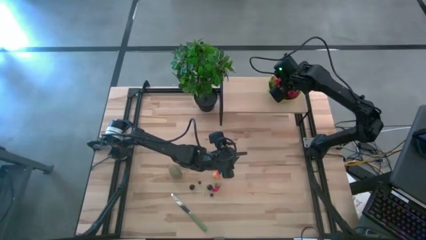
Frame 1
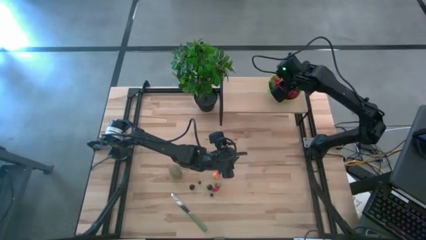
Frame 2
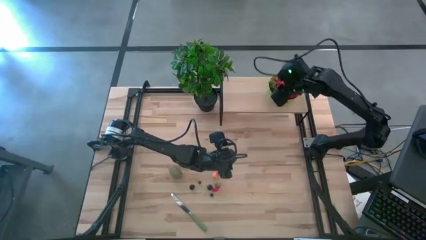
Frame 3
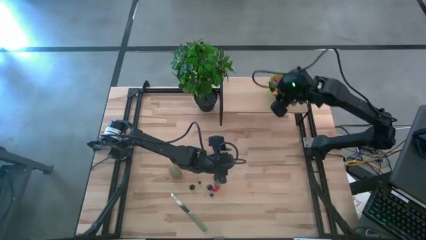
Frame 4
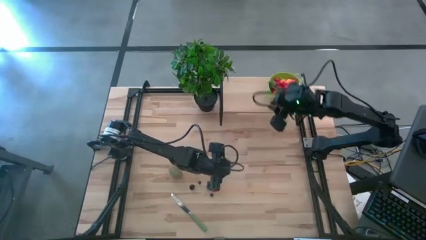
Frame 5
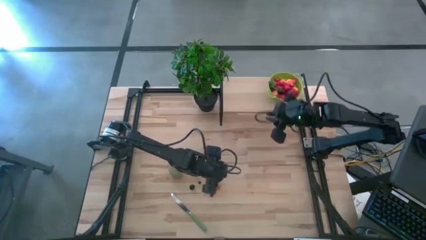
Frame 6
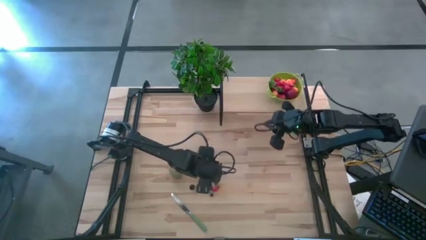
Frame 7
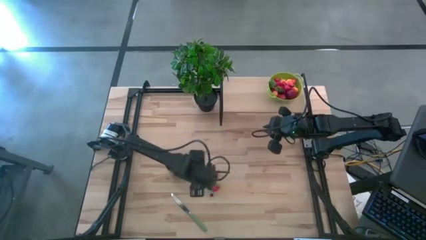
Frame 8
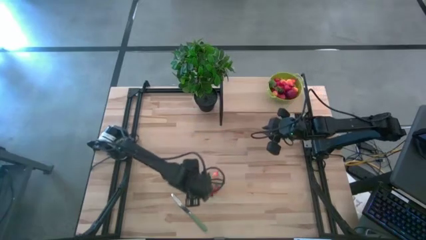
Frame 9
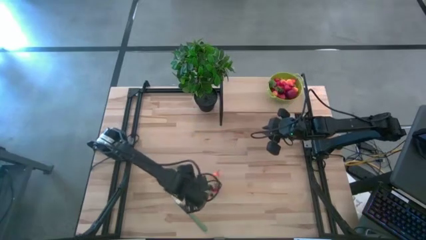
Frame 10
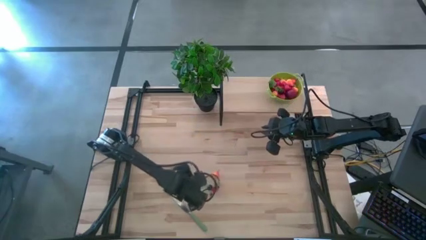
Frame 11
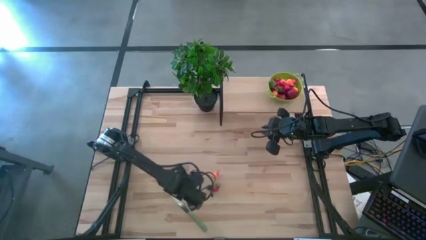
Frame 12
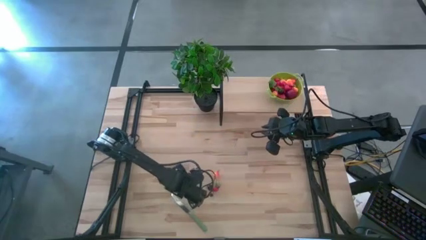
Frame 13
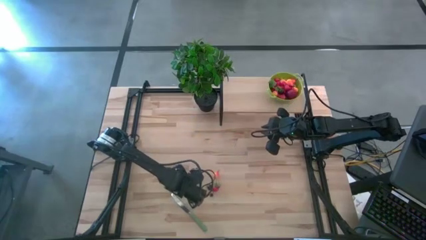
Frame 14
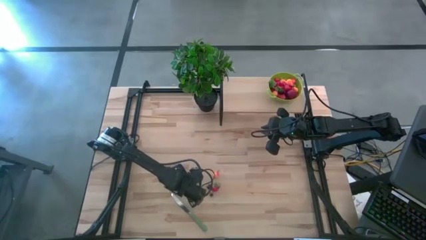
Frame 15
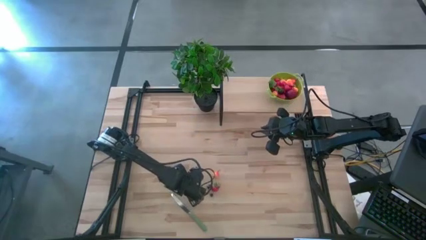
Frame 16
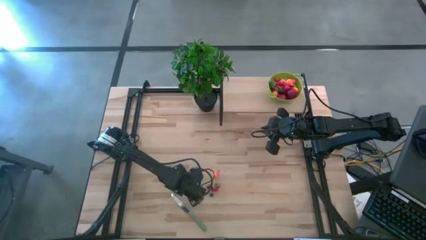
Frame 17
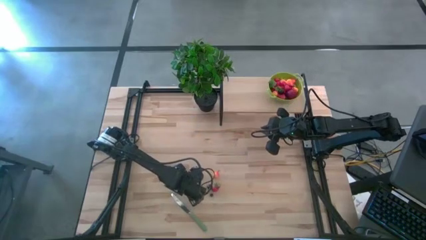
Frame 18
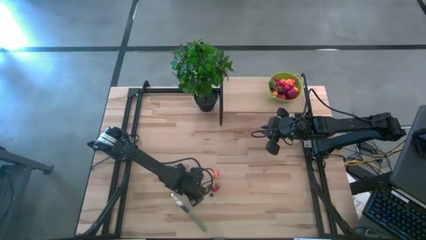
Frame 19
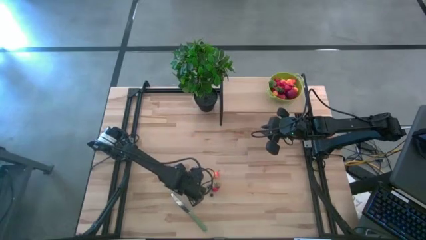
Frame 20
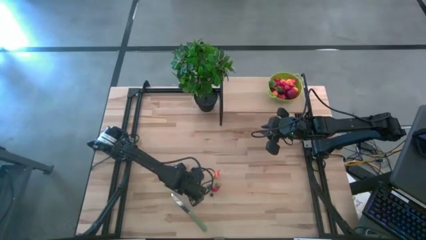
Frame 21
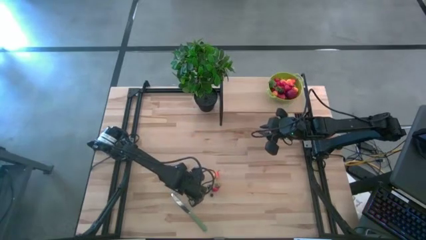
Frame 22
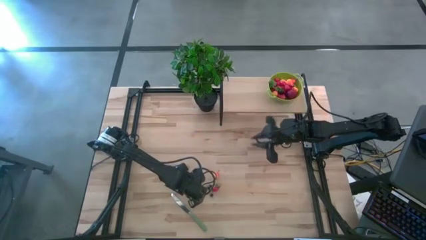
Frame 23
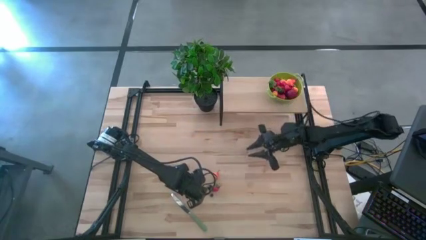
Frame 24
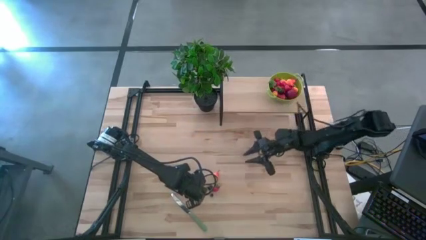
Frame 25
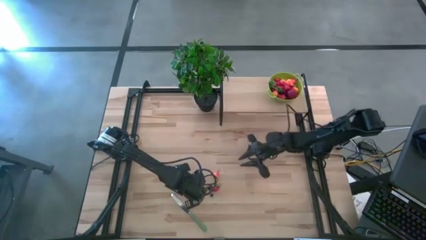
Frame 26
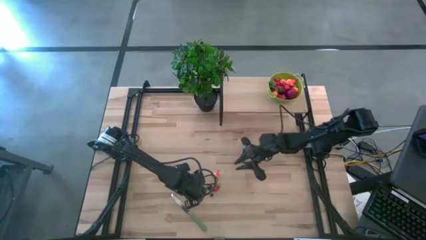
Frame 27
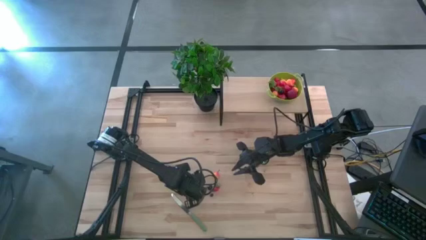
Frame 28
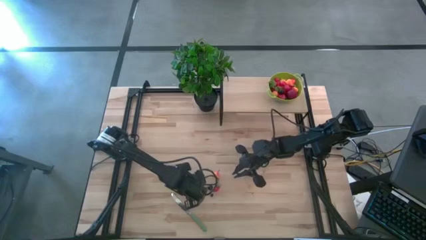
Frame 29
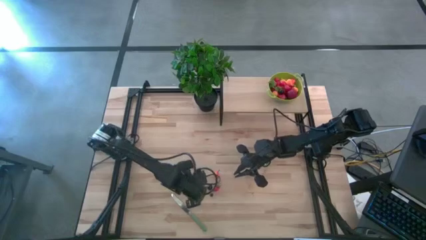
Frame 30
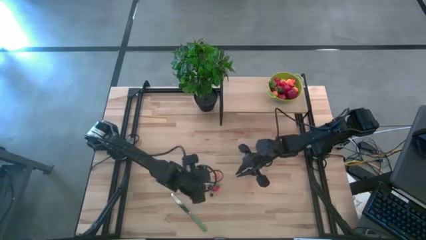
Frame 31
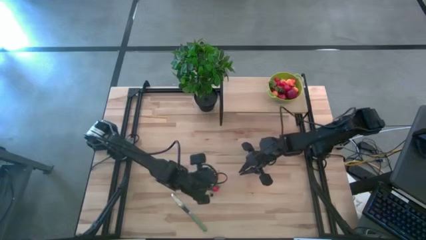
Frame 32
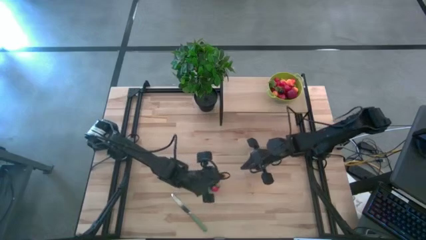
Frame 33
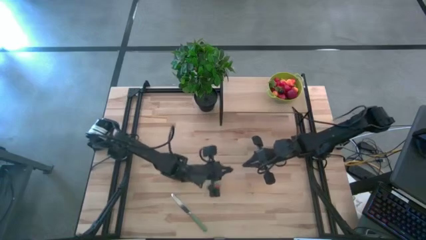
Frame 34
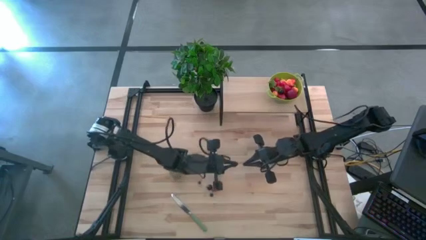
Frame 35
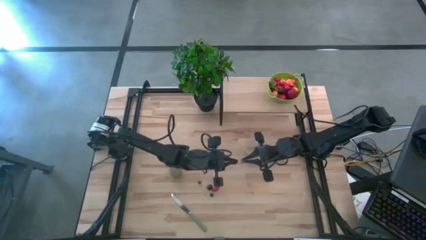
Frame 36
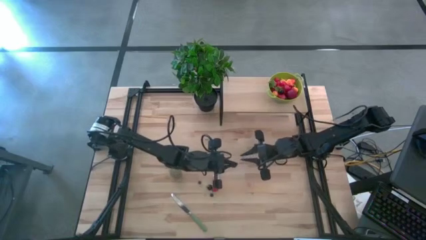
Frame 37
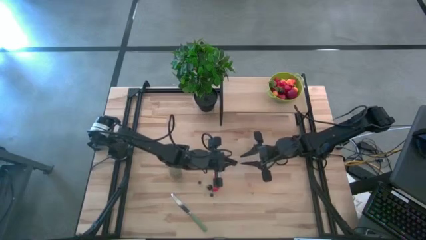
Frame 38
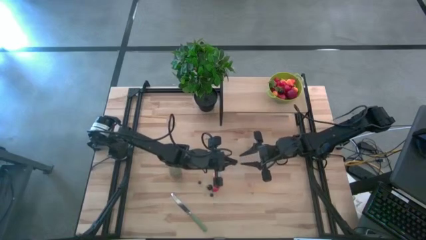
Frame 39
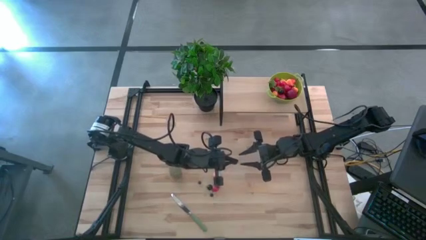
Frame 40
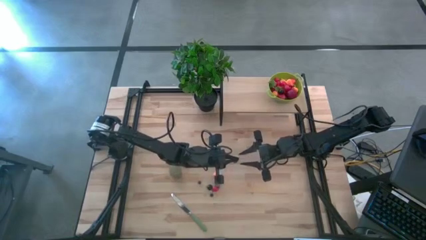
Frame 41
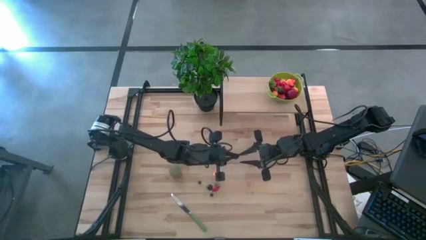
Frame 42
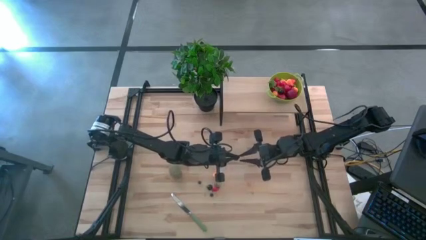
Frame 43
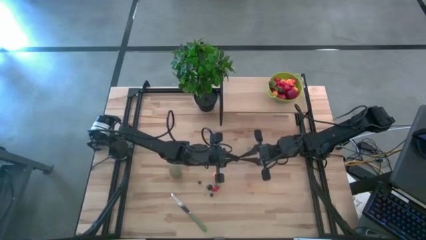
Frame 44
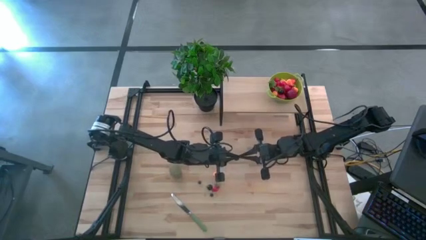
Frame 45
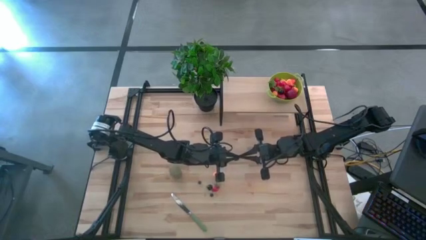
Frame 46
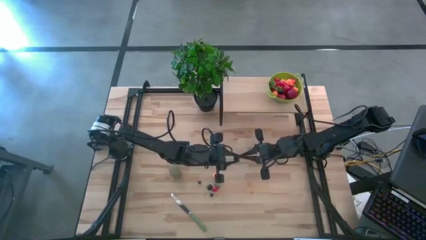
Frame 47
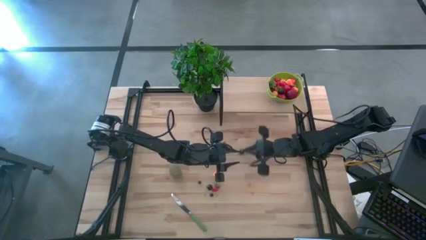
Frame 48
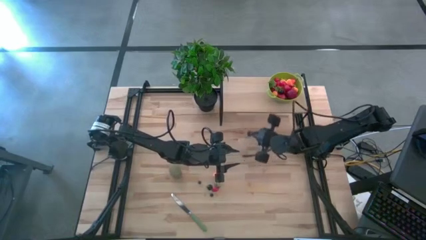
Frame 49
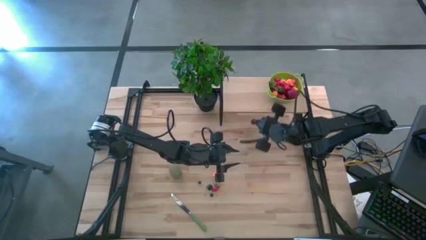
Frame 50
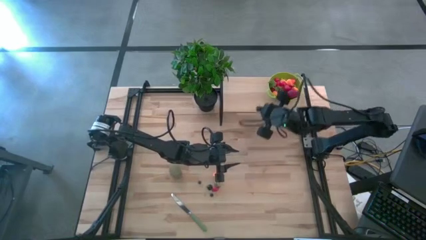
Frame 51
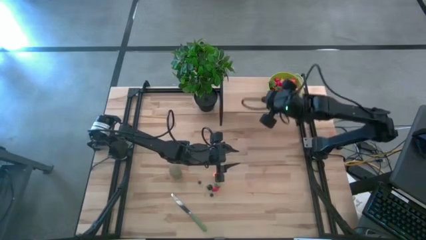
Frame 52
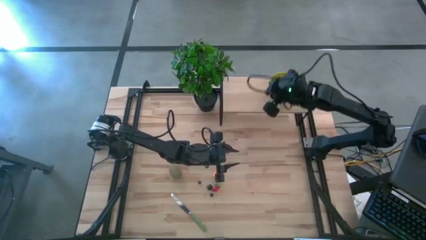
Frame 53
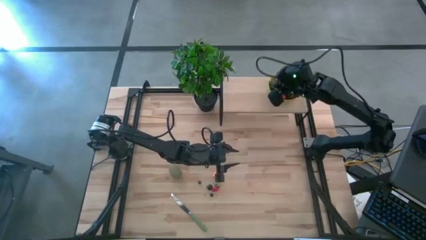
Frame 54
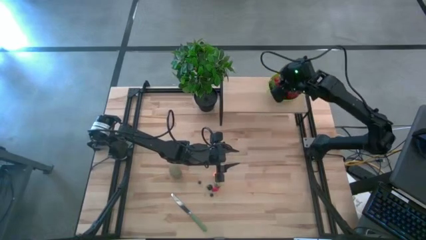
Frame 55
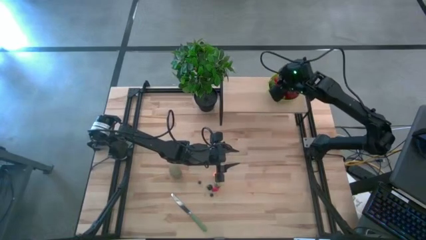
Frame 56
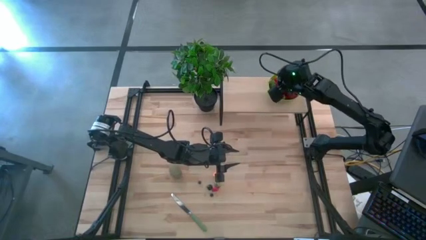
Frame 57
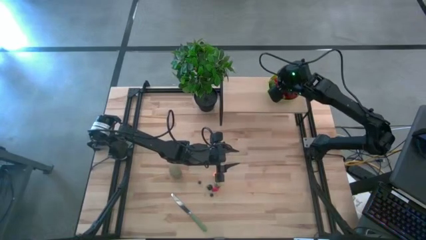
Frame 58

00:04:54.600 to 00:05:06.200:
Task: Pick & Place Fruit
Put the black cherry into the green strainer bowl on the shelf

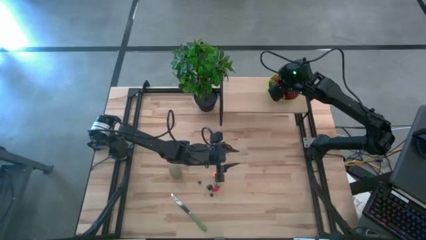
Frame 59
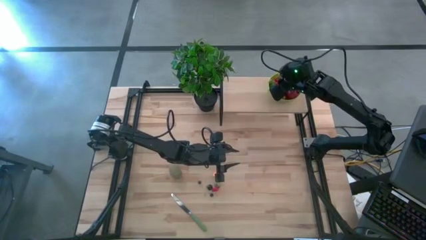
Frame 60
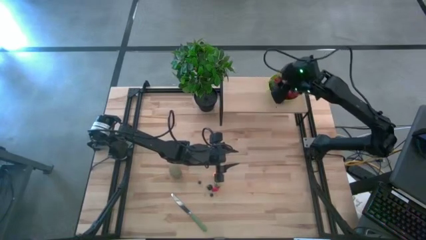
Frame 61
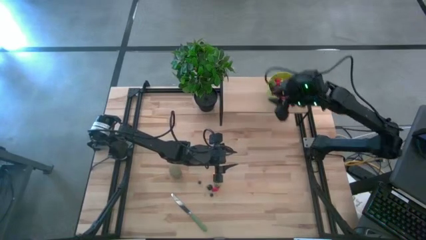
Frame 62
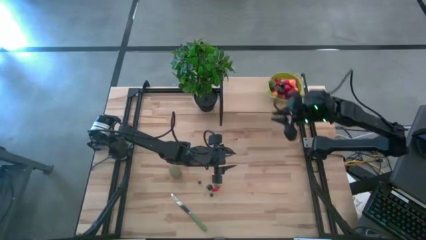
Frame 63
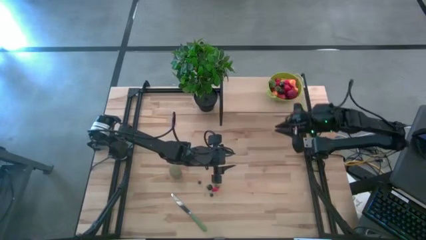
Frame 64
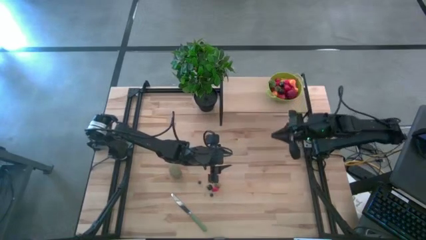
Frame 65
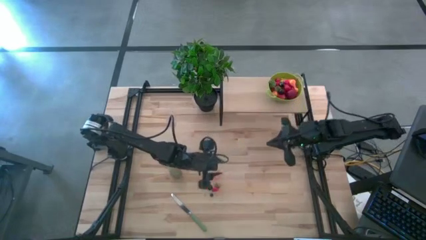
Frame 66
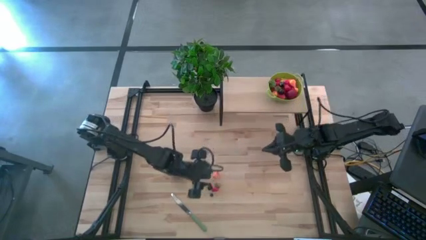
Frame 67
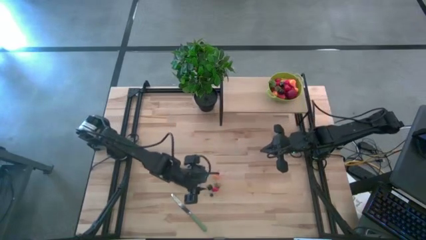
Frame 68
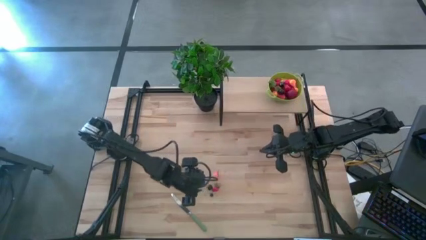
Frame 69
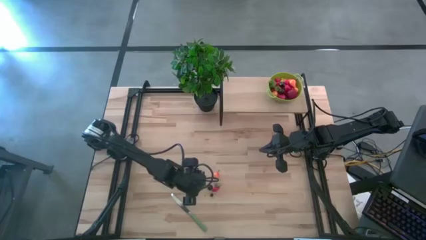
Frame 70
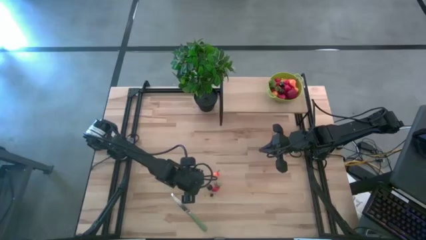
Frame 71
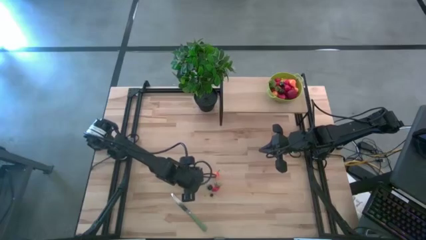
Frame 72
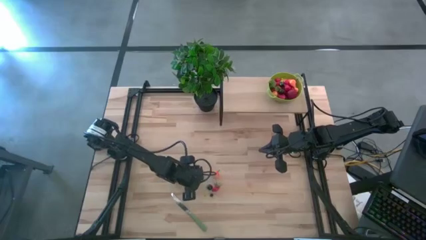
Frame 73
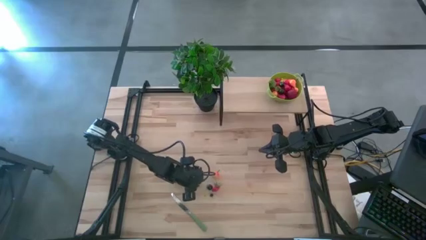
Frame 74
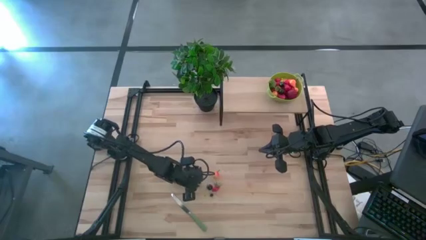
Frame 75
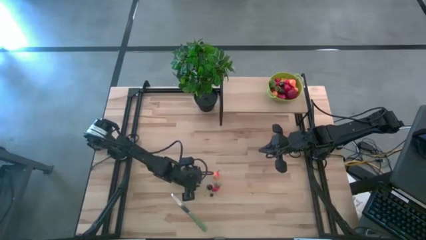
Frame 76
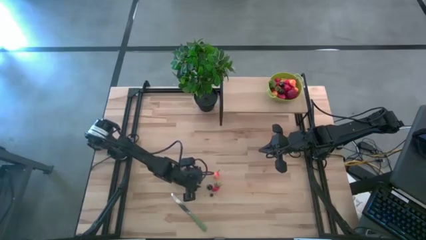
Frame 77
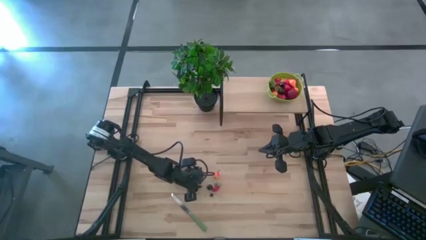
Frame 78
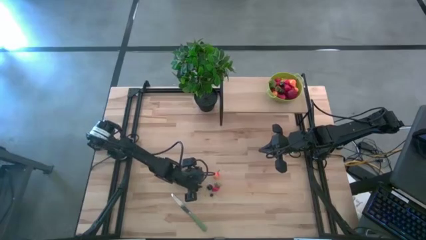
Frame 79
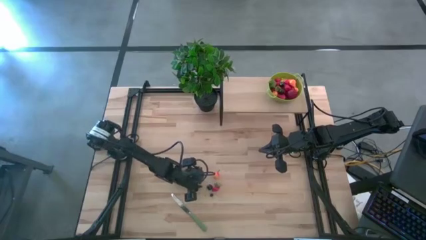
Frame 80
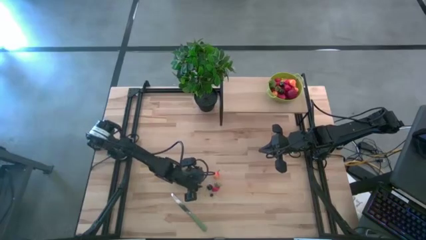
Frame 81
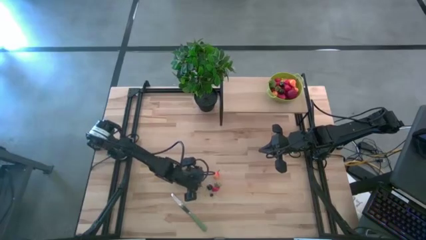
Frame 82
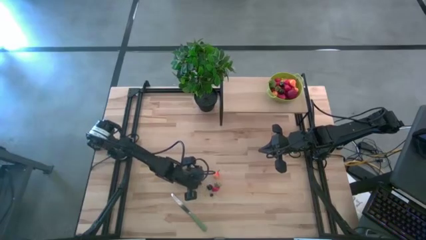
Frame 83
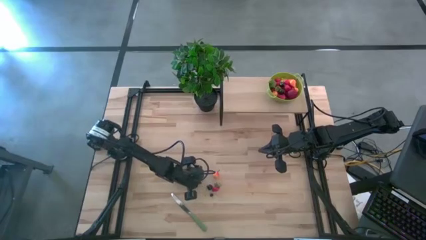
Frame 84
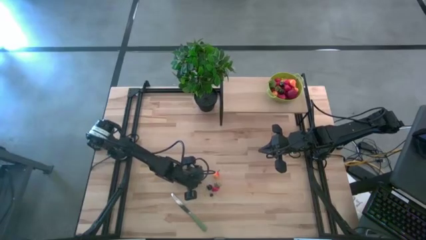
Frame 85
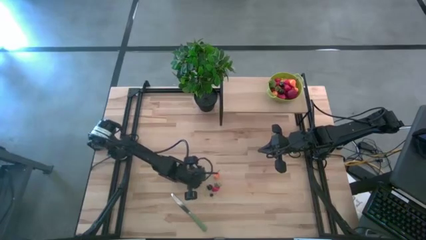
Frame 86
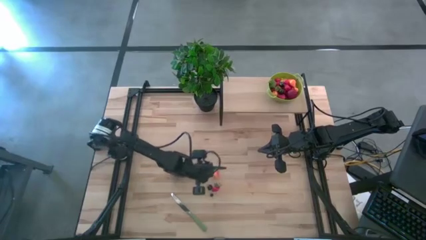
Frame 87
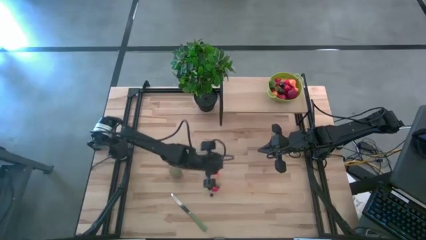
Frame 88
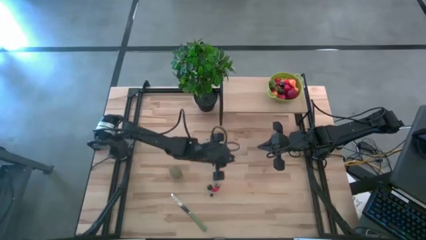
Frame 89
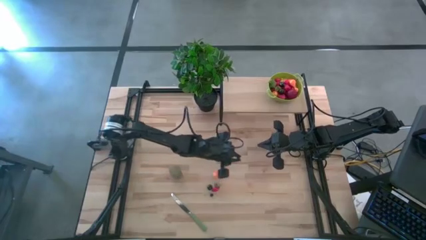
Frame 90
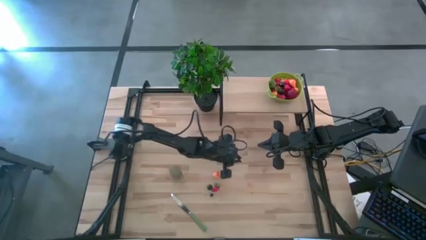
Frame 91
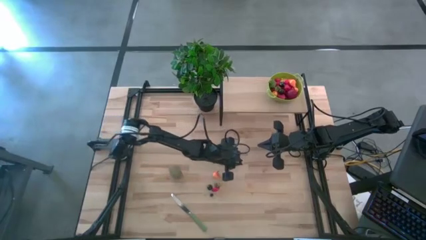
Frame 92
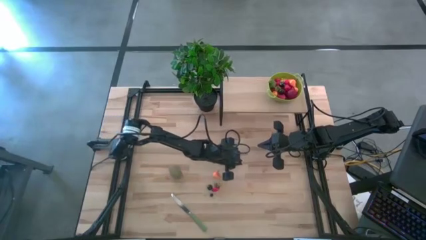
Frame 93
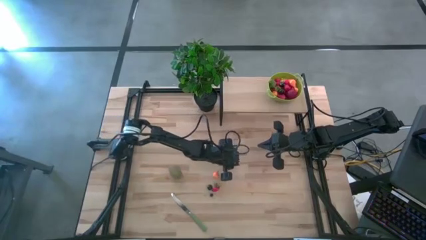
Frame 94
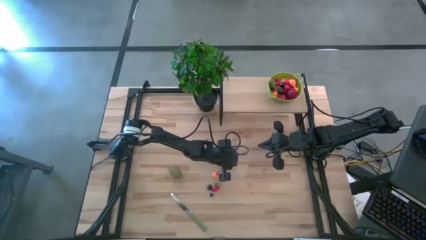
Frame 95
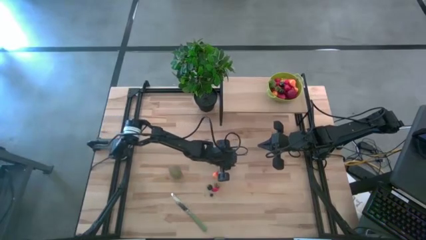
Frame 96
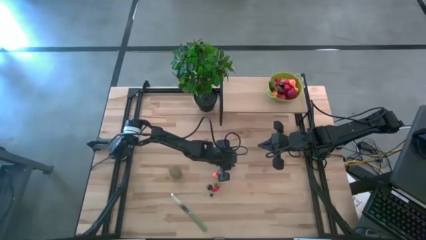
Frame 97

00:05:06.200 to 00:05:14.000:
Put the blueberry into the green strainer bowl on the shelf
